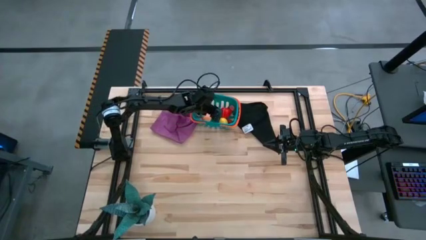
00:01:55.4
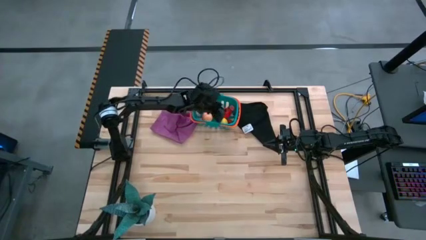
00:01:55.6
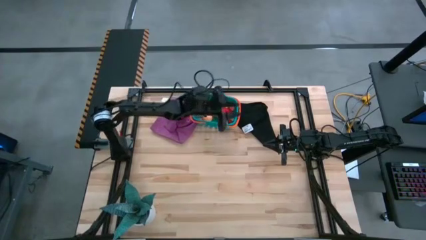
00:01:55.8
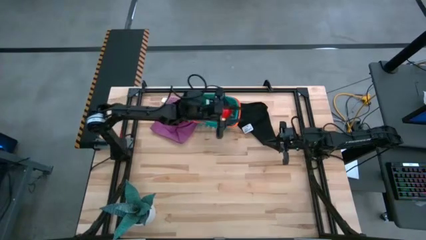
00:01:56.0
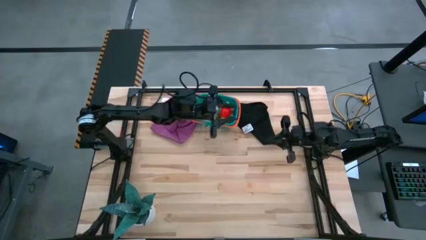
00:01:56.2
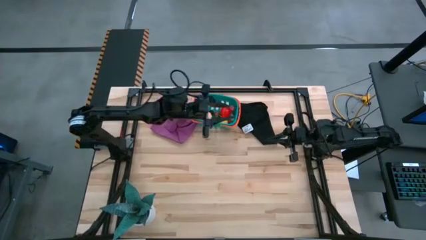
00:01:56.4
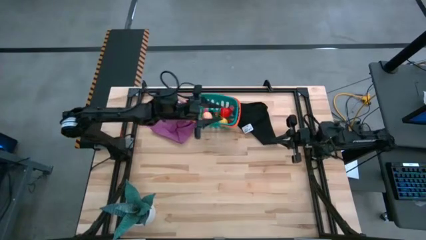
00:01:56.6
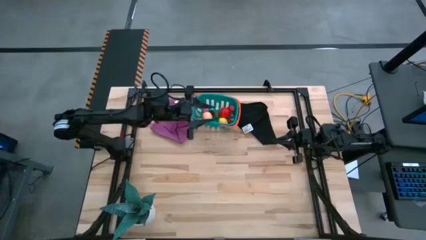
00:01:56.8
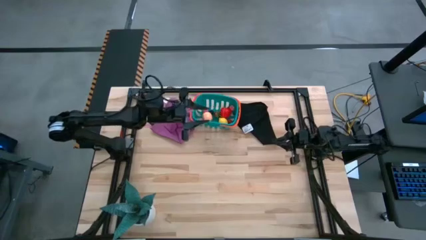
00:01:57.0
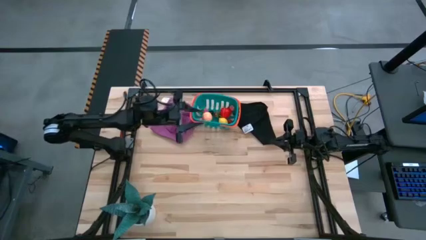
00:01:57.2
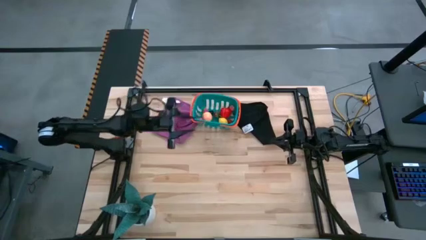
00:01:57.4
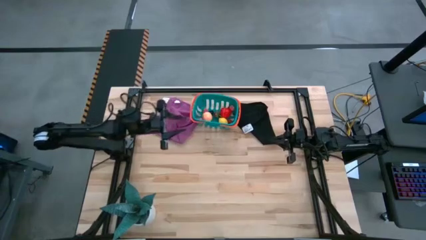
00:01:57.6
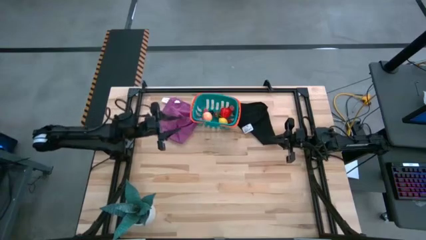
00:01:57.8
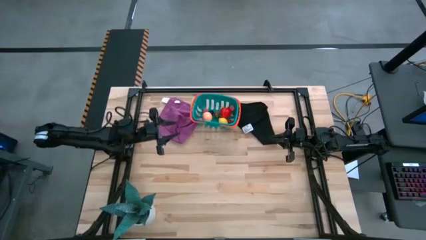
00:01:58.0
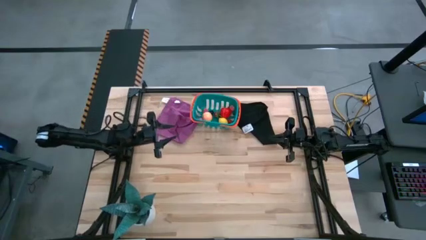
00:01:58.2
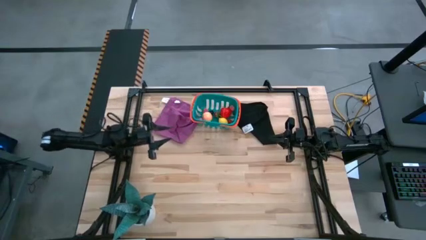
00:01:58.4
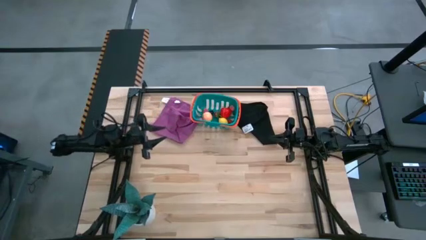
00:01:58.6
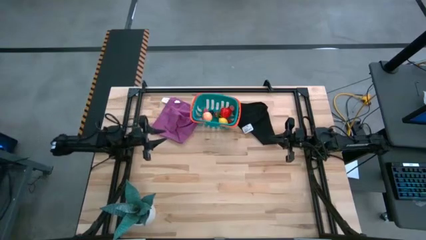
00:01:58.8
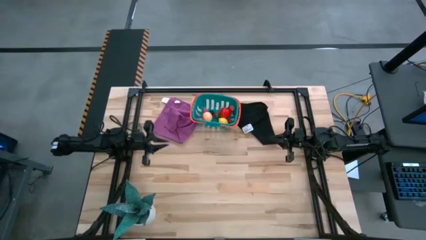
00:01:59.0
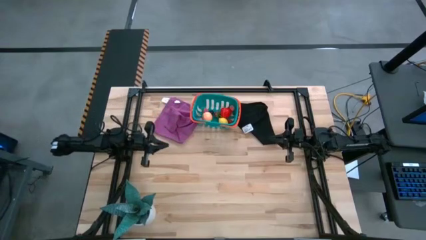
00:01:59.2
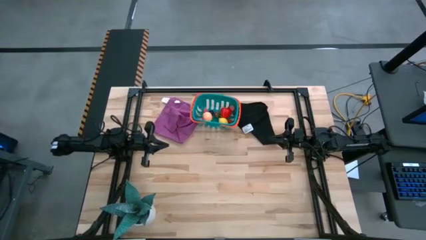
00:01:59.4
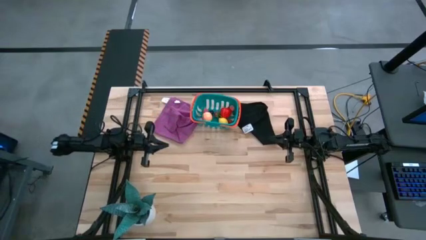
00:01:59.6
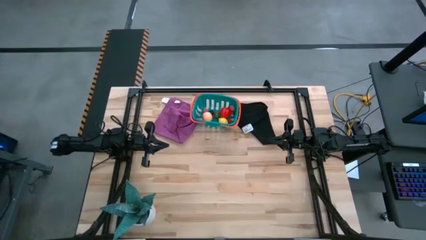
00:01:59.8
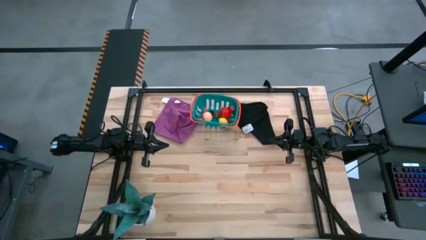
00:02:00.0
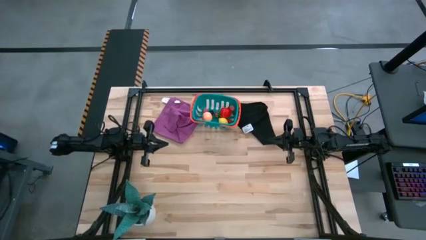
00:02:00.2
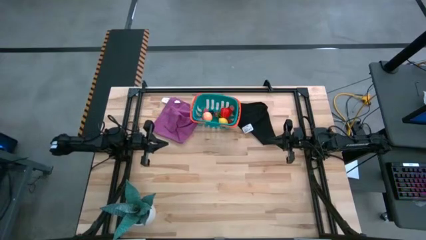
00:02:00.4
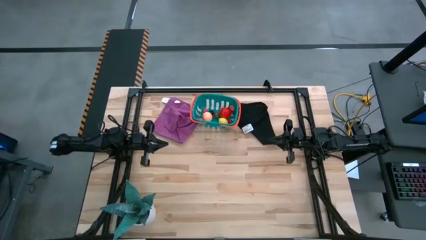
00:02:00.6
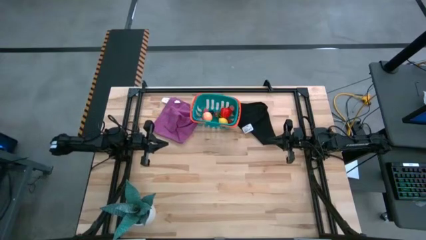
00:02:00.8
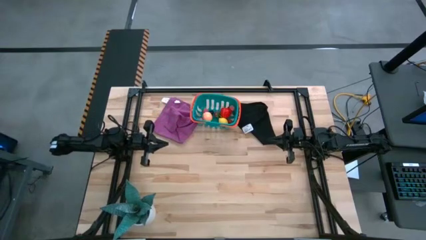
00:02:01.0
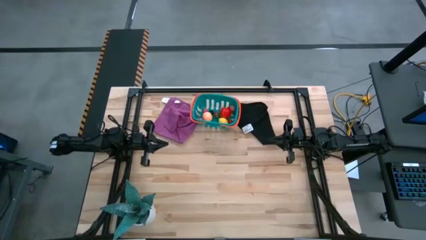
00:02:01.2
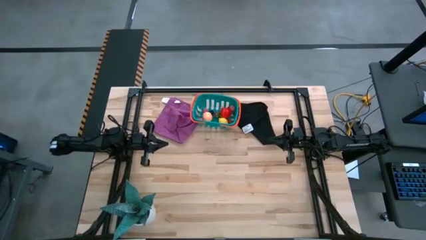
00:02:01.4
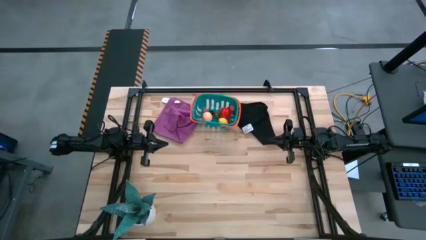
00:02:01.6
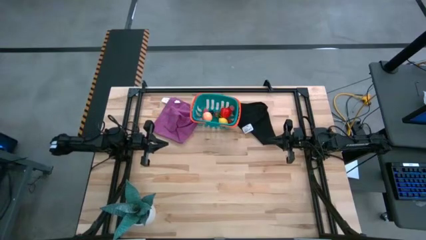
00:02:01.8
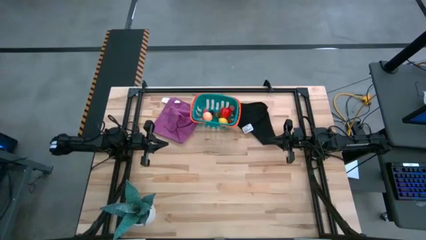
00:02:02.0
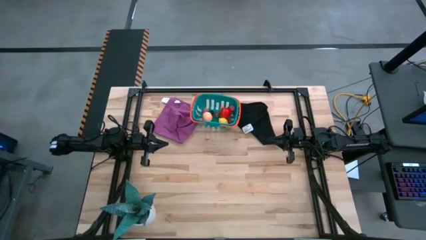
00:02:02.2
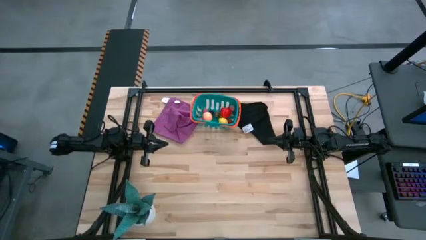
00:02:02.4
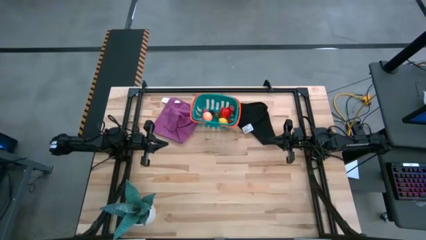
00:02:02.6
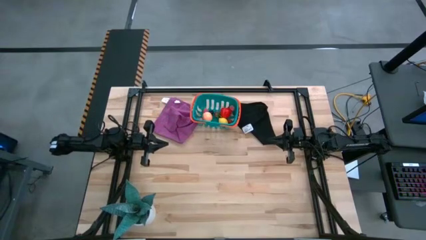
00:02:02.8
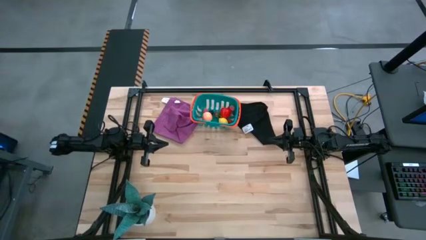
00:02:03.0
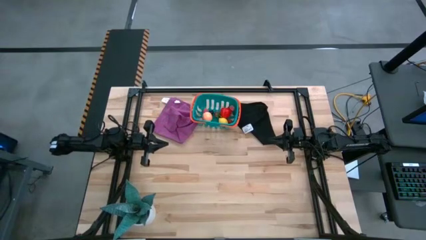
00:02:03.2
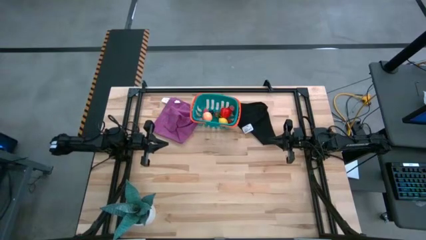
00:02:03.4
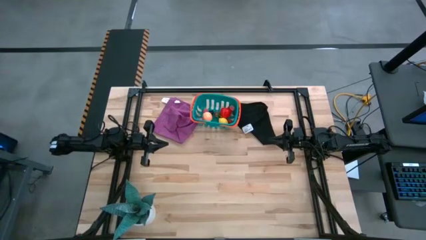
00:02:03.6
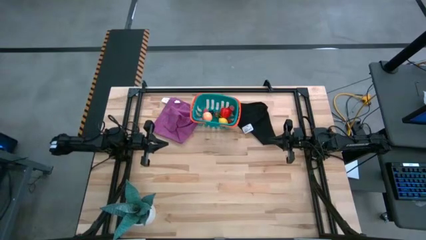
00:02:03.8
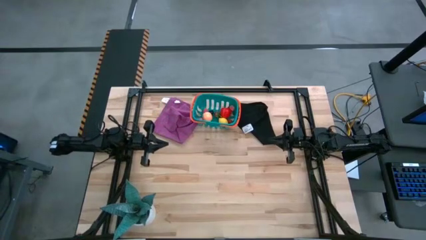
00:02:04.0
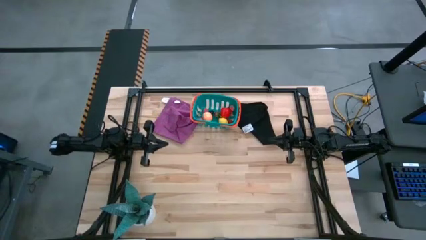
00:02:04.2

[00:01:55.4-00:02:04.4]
Task: Pick and placing Produce into tupperware
Return to Home Position

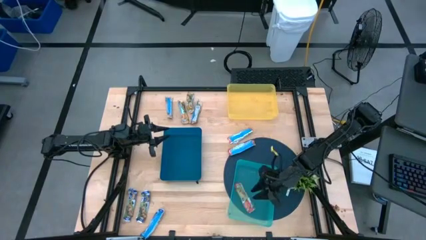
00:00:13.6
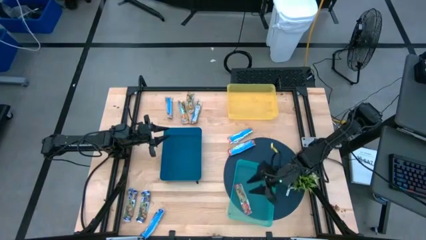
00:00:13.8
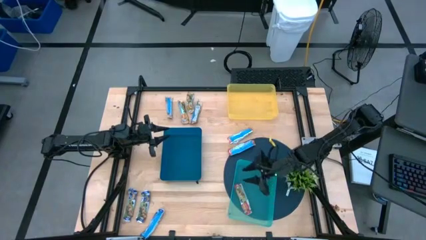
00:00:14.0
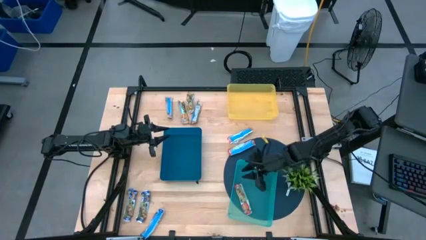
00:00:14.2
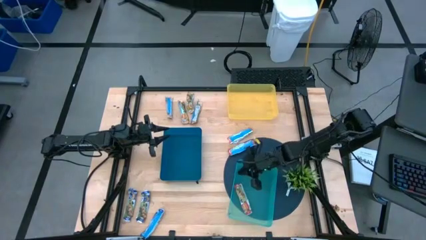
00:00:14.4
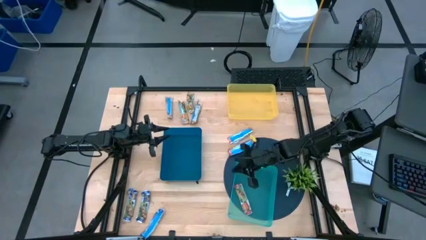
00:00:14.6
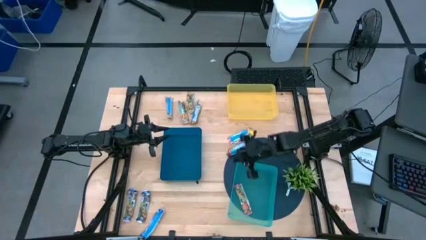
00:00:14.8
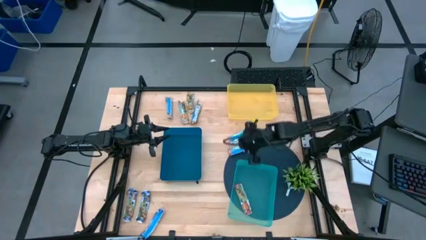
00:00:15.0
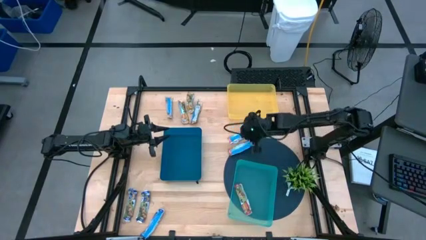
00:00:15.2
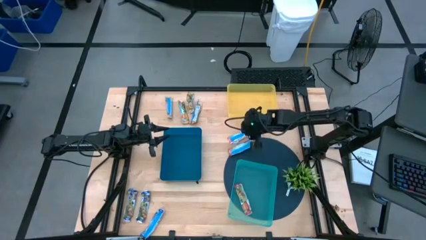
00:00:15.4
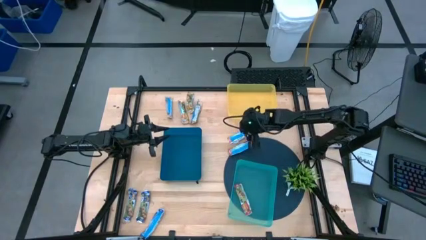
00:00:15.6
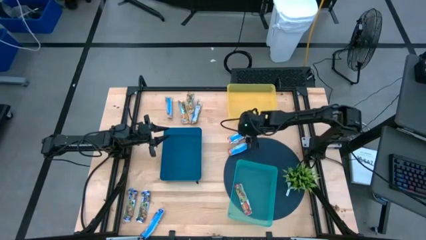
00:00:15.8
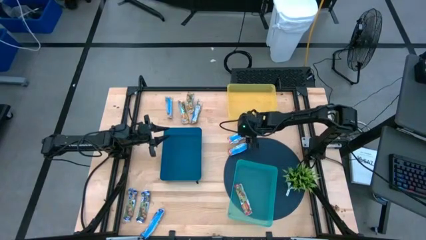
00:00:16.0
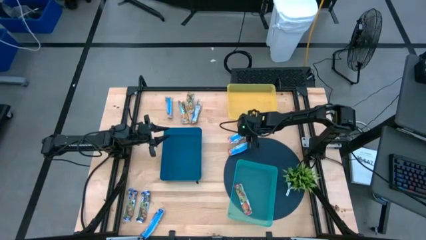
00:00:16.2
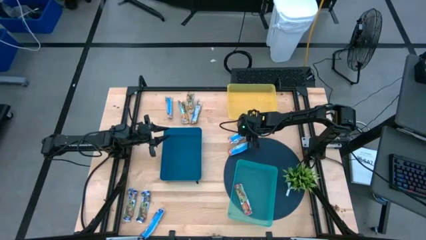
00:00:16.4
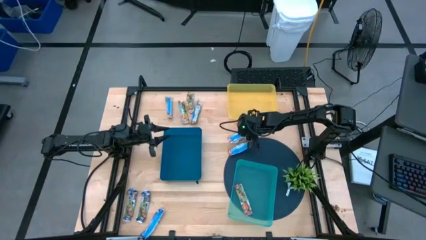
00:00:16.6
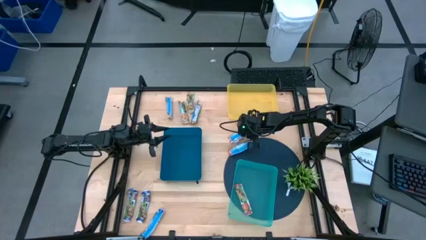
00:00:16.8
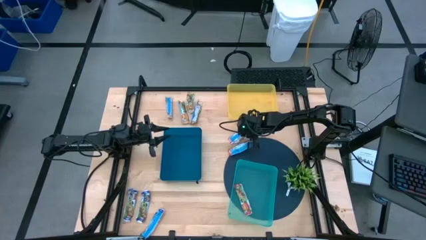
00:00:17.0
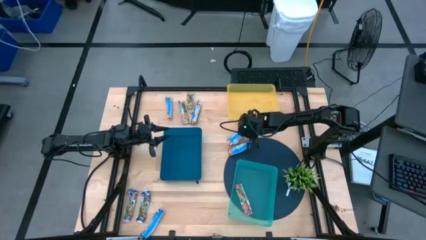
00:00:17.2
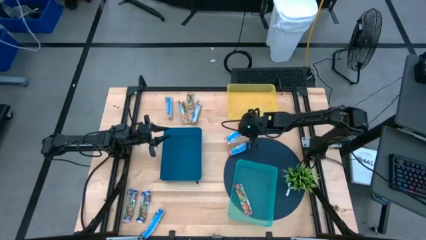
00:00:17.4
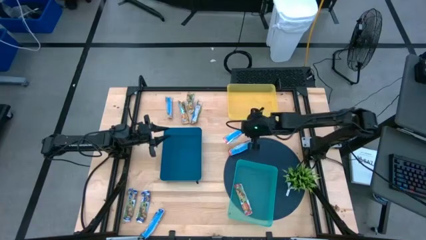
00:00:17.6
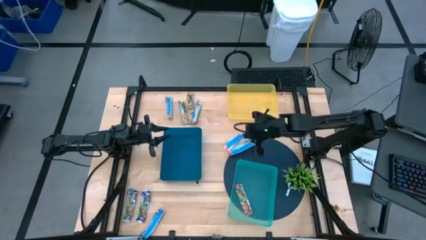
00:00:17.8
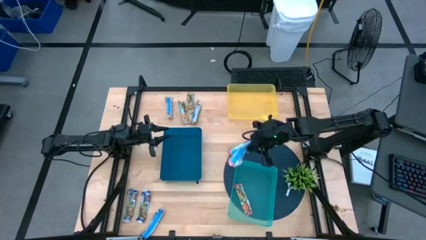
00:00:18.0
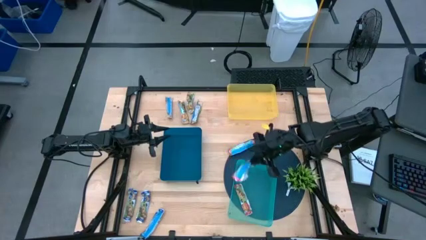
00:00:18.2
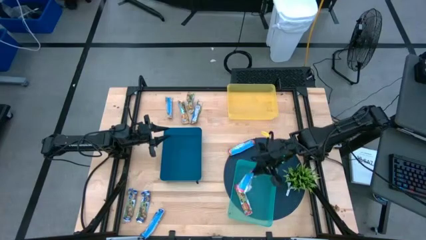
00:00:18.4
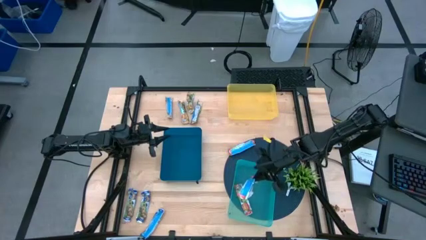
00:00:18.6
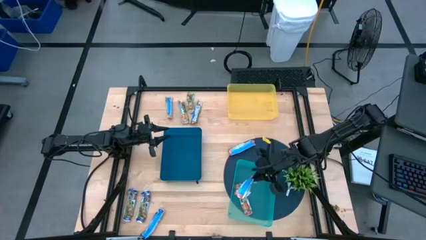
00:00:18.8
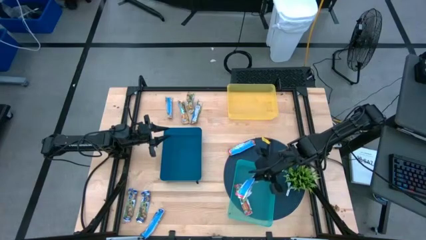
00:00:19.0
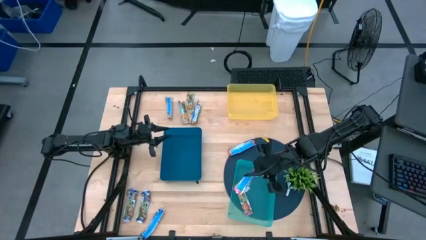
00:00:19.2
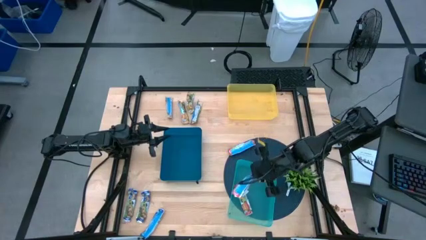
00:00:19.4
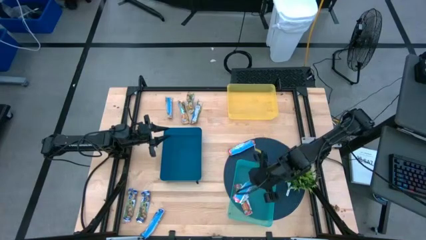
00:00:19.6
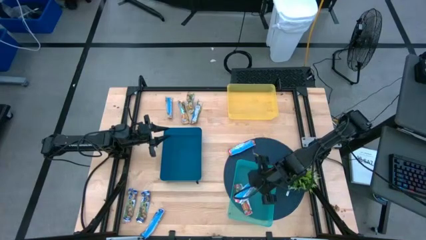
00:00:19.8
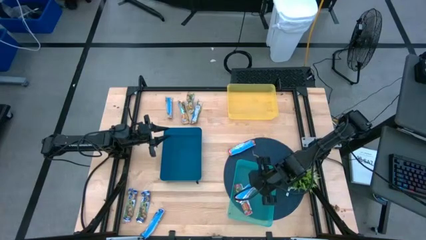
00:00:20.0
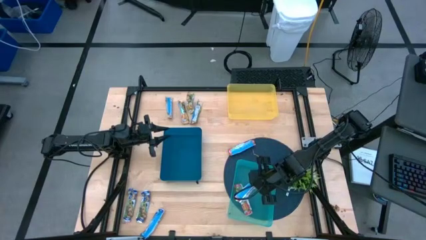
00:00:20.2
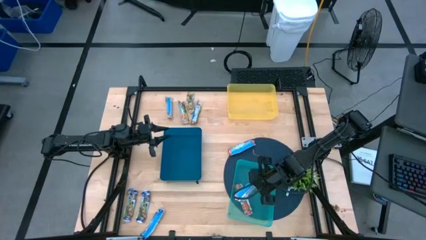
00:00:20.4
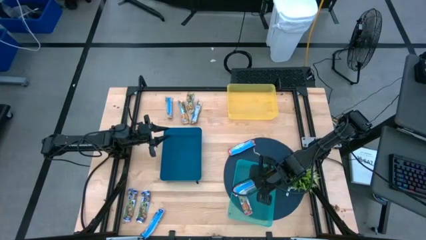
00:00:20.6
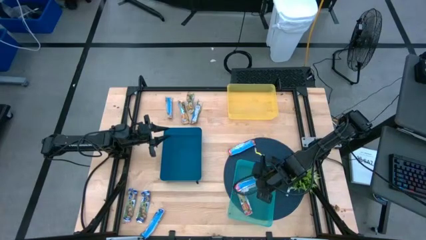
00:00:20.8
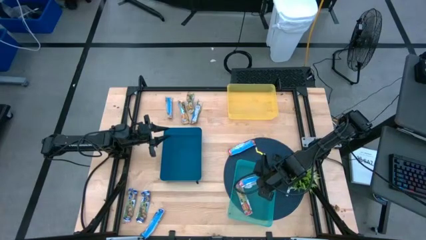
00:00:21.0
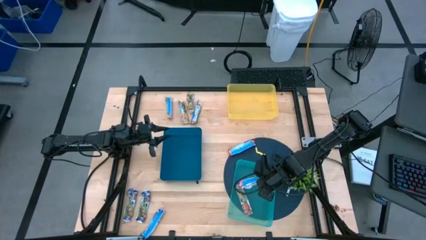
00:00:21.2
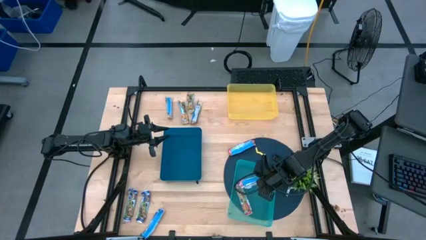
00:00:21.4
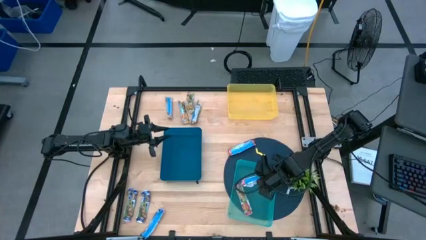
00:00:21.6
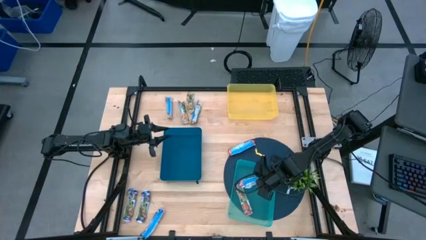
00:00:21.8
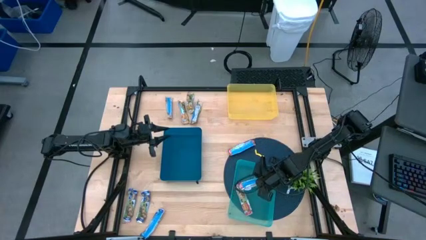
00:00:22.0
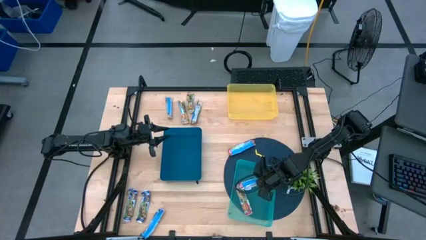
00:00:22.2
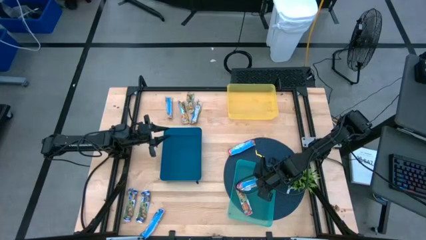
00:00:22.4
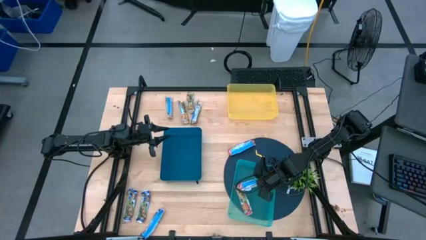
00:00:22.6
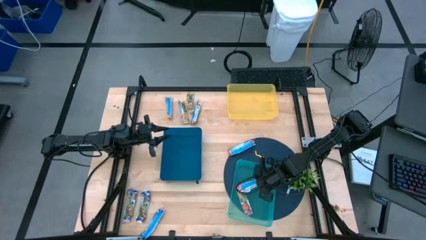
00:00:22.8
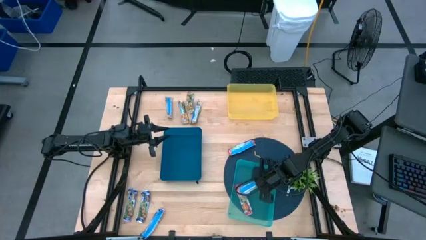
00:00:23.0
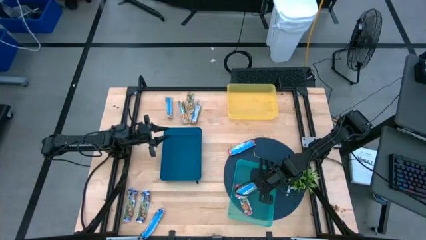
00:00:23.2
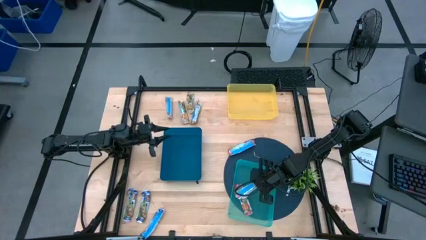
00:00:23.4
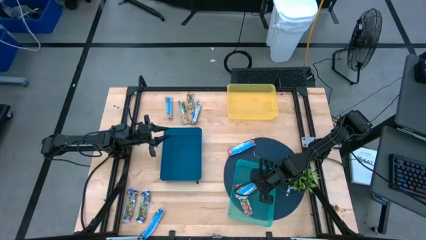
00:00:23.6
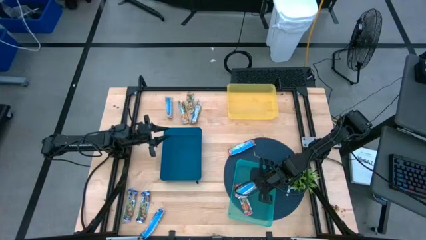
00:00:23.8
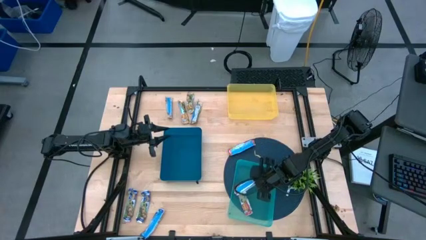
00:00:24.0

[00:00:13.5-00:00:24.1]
Task: Pick and place Granola Bars by type
Put the top red granola bar into the green bin
